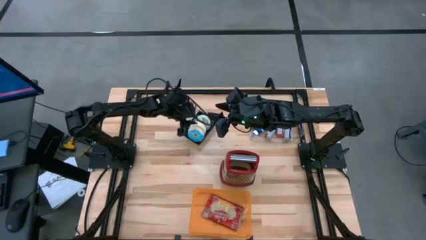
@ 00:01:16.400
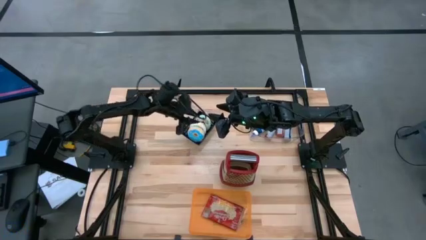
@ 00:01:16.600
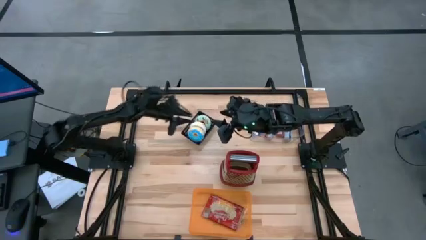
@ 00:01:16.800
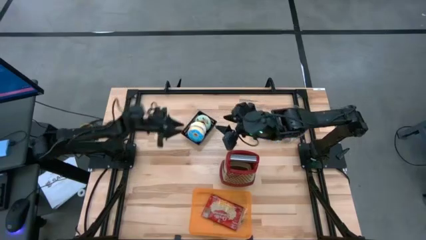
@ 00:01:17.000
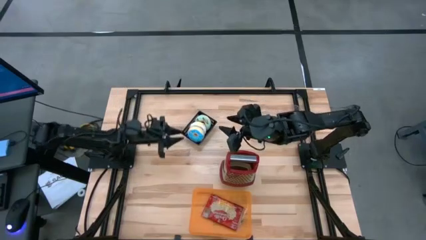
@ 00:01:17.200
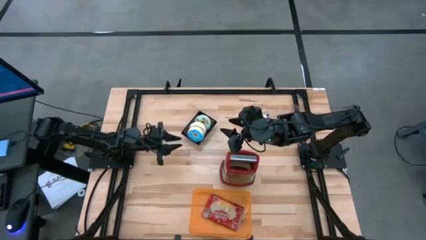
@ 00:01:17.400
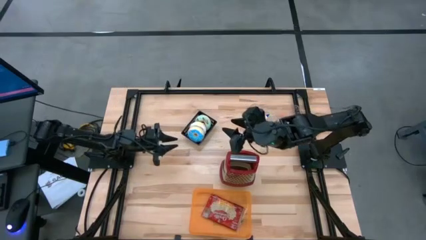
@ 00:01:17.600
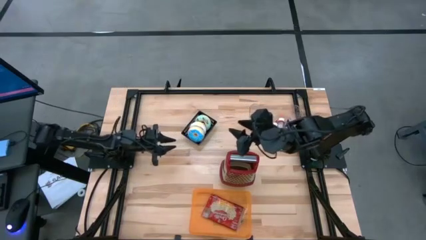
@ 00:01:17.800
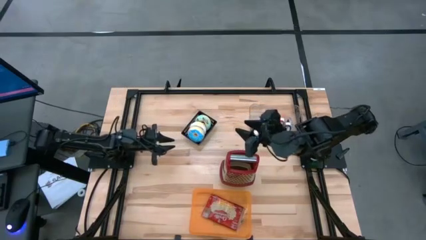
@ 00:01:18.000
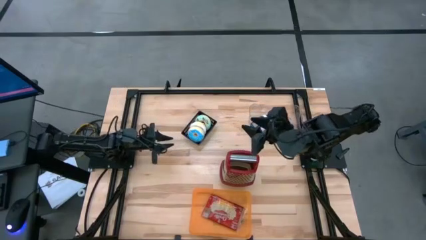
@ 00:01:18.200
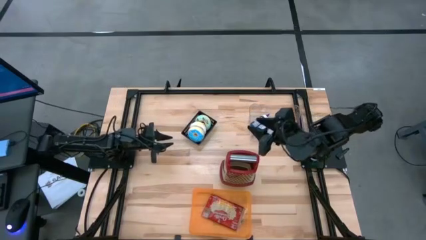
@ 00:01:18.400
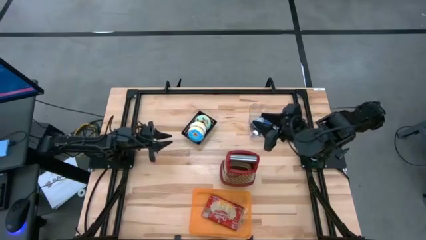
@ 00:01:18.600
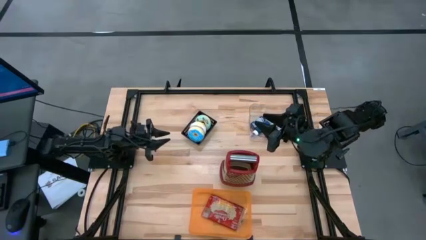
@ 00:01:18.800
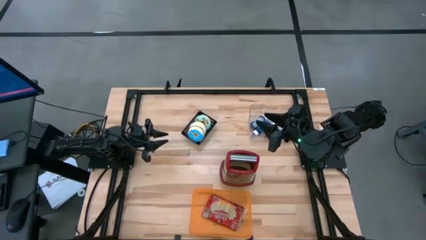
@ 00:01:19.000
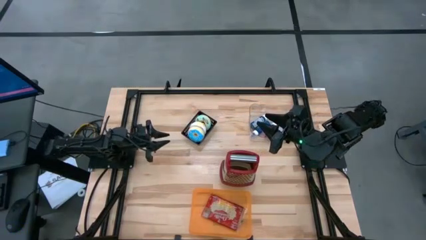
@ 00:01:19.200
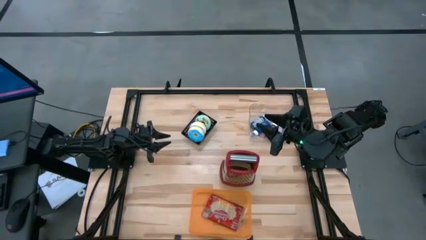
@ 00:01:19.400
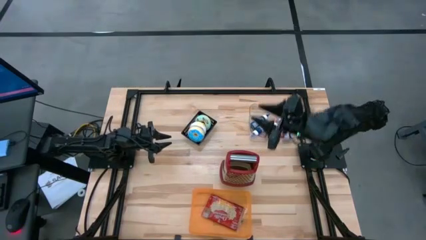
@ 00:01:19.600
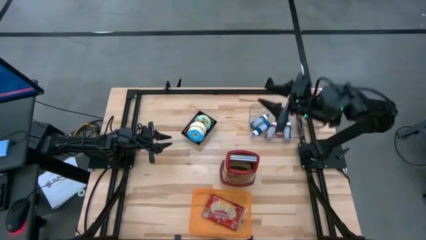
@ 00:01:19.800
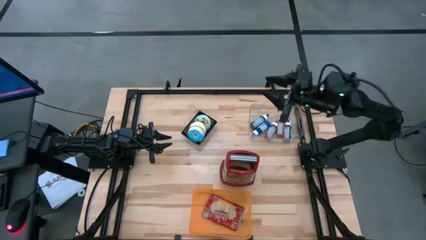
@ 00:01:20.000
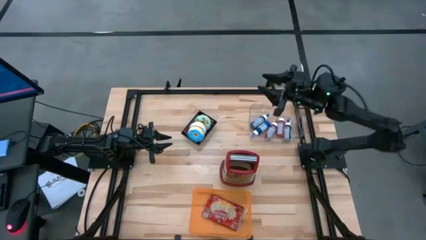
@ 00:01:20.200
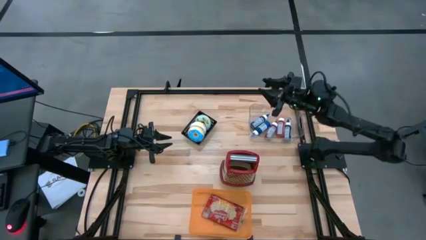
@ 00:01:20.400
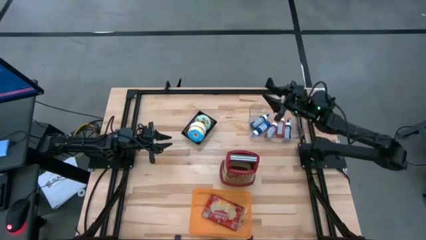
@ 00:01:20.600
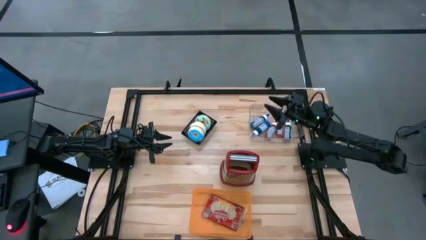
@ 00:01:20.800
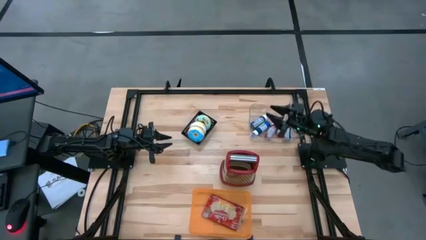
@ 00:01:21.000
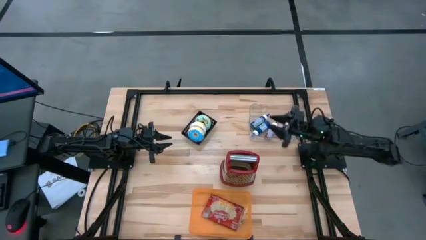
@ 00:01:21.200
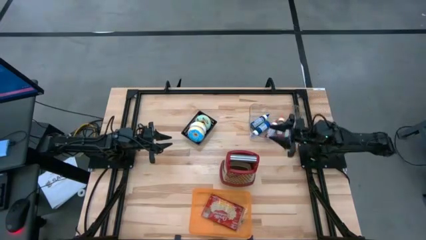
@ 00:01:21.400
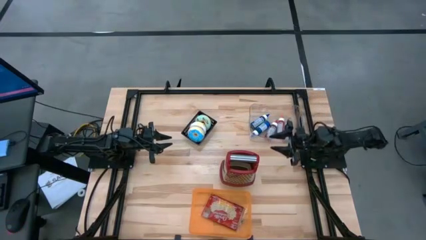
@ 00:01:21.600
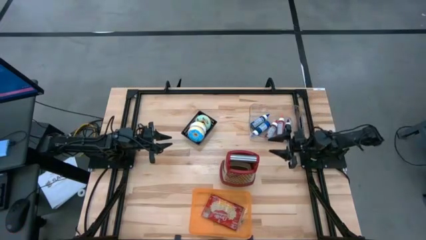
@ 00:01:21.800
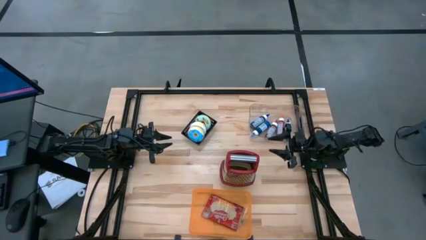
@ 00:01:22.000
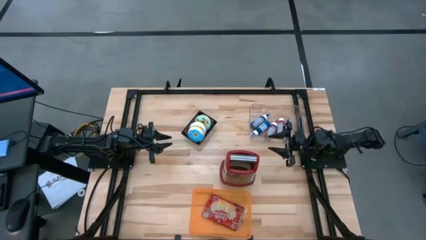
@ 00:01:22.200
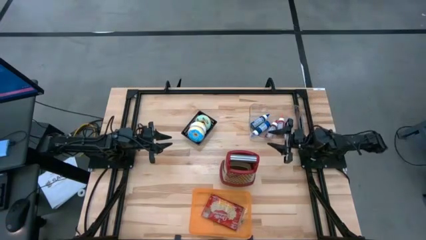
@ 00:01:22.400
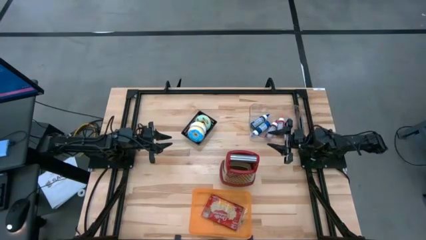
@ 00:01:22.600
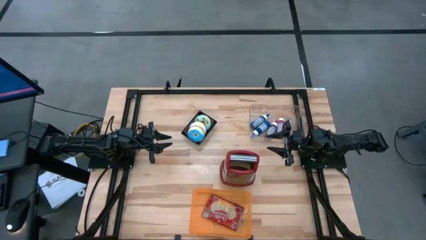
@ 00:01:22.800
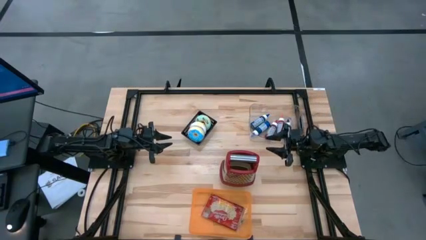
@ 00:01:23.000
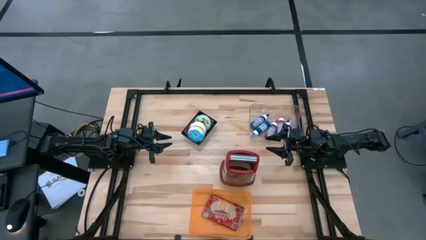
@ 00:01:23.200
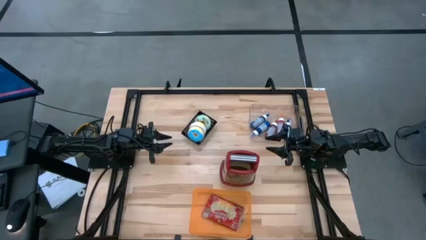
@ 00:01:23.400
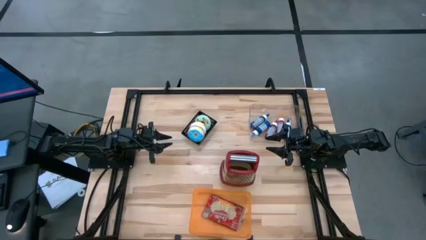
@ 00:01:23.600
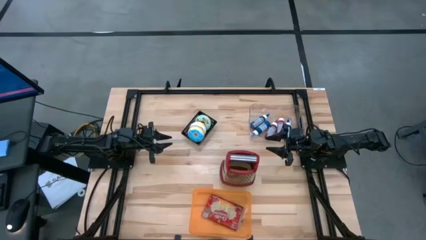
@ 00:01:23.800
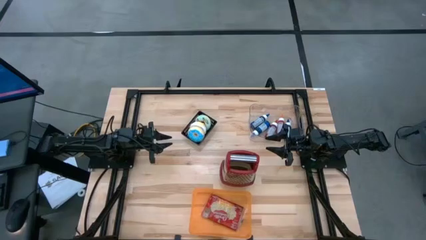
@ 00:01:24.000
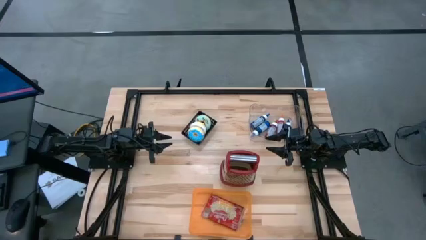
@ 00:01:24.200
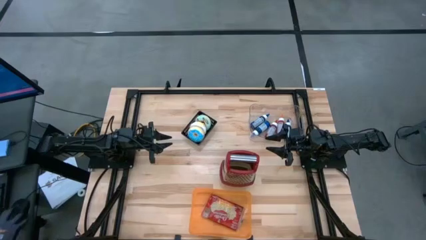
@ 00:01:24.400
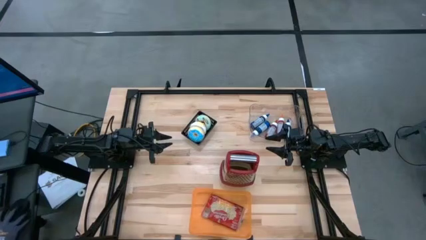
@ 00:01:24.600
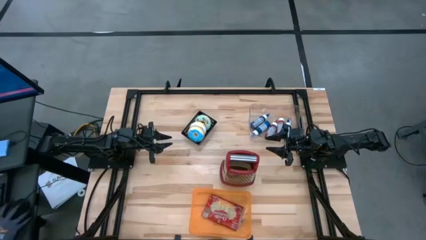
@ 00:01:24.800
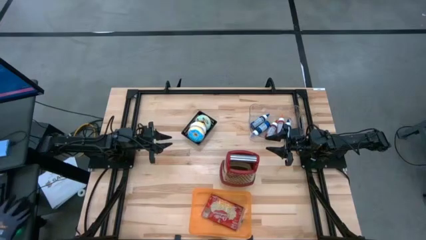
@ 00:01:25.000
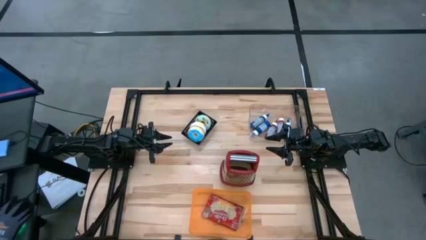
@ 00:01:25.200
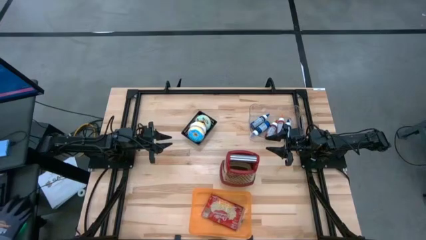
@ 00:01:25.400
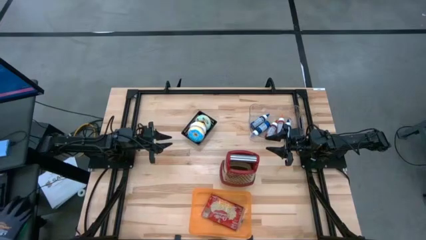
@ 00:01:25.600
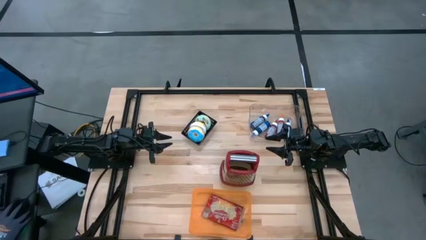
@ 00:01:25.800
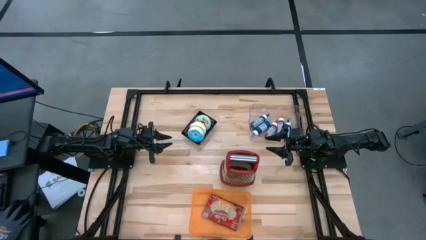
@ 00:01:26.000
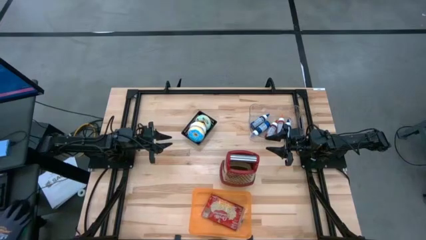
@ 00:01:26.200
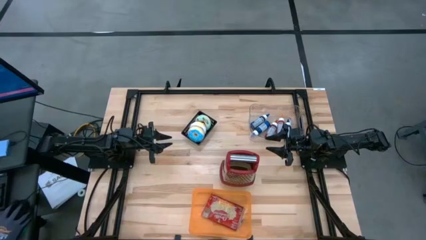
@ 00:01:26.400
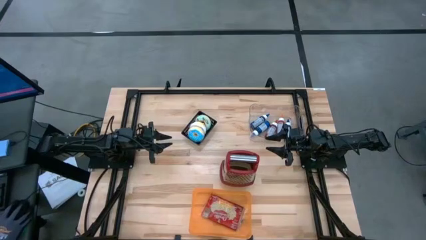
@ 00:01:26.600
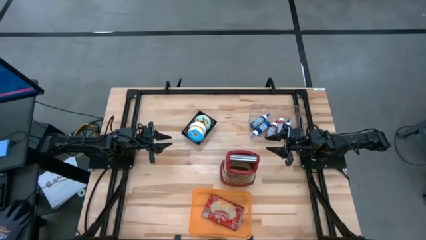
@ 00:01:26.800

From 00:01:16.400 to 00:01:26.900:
Return to Home Position
